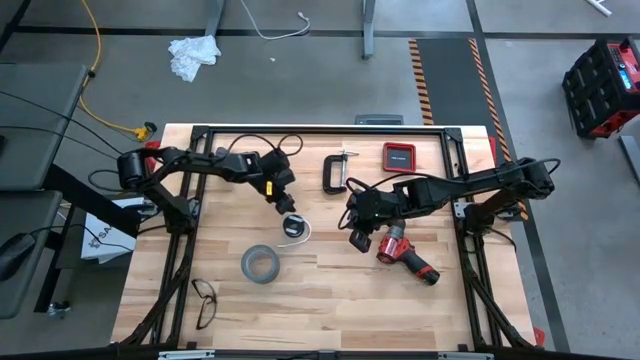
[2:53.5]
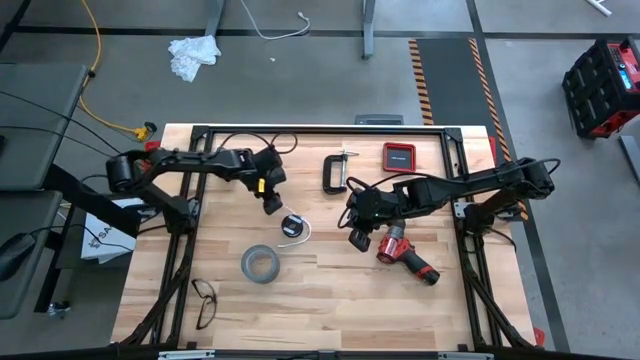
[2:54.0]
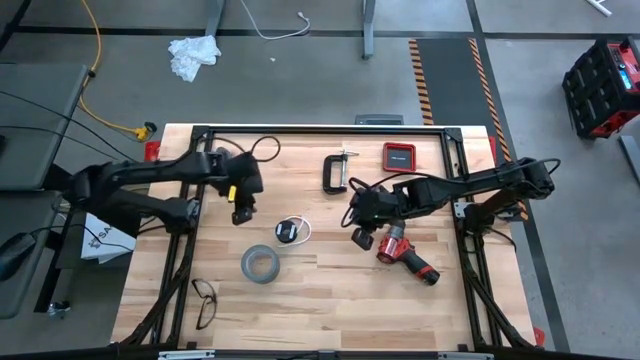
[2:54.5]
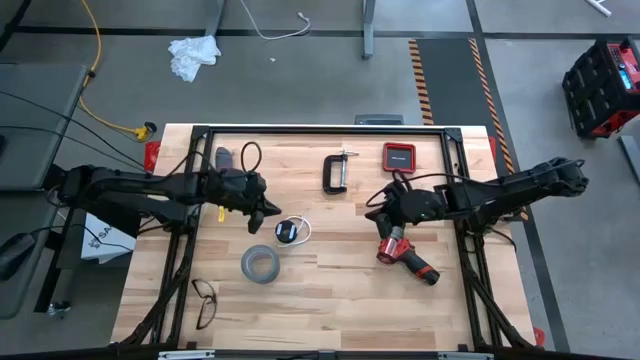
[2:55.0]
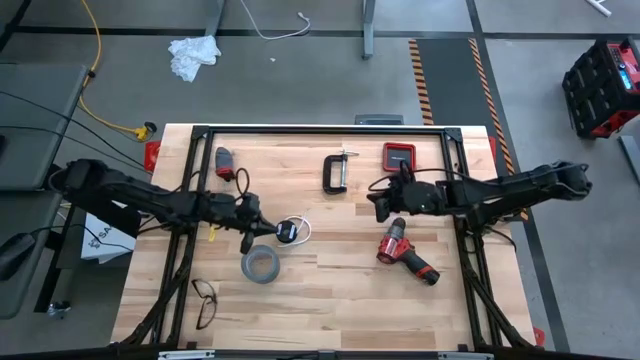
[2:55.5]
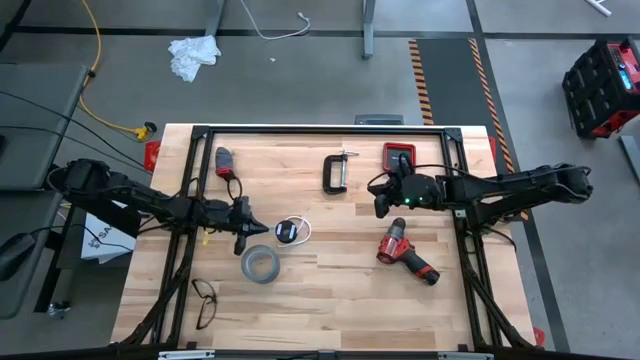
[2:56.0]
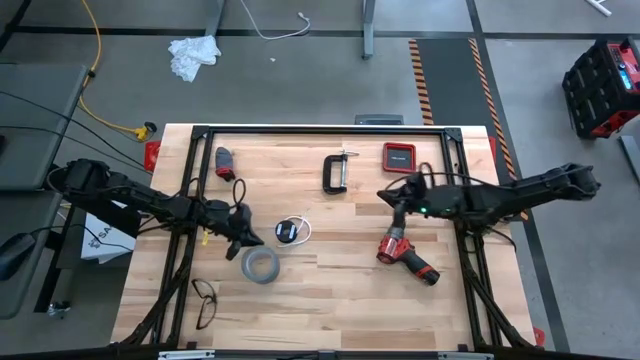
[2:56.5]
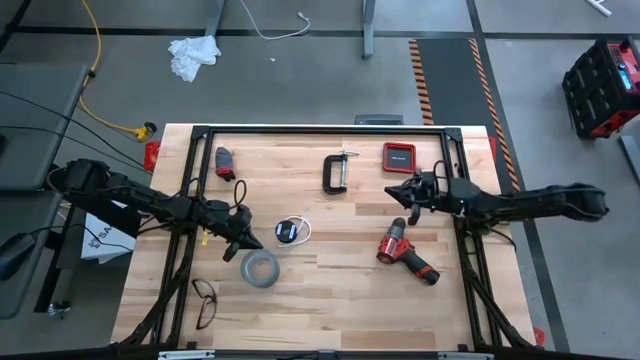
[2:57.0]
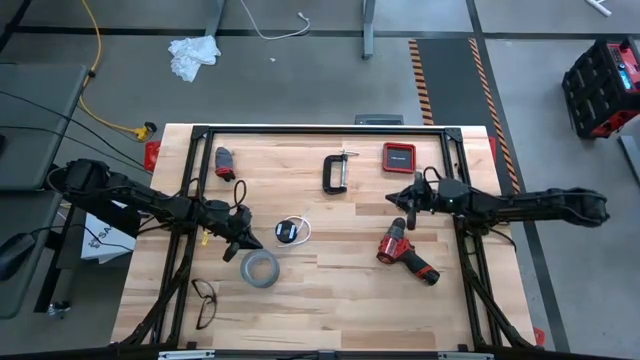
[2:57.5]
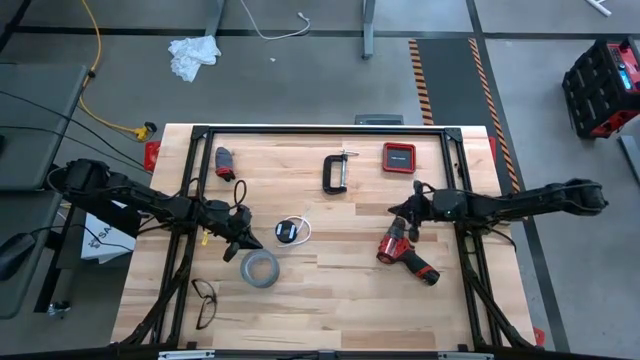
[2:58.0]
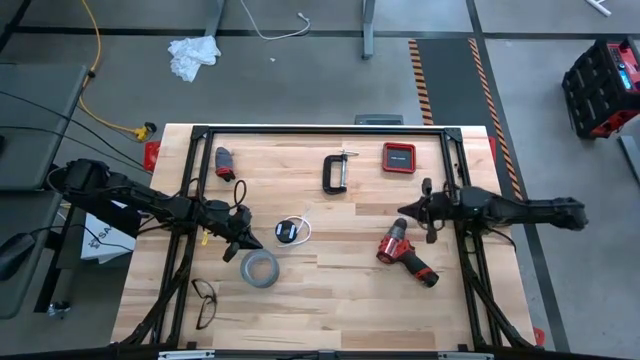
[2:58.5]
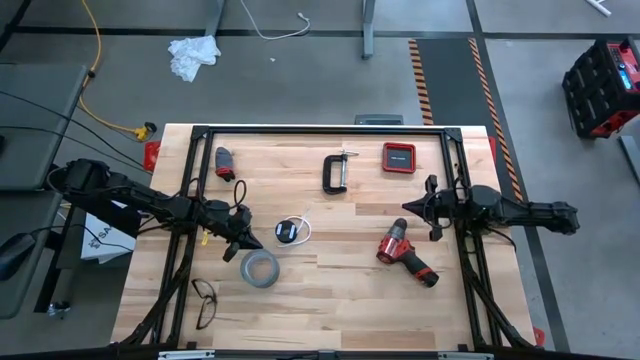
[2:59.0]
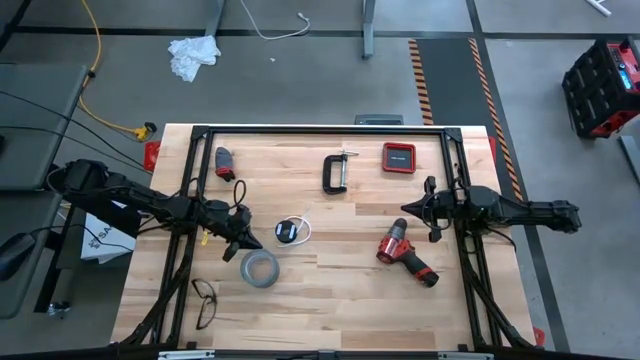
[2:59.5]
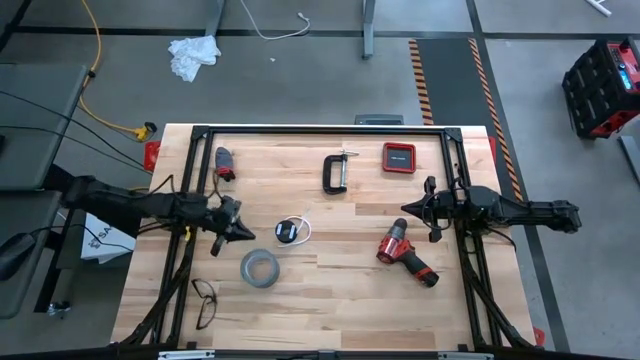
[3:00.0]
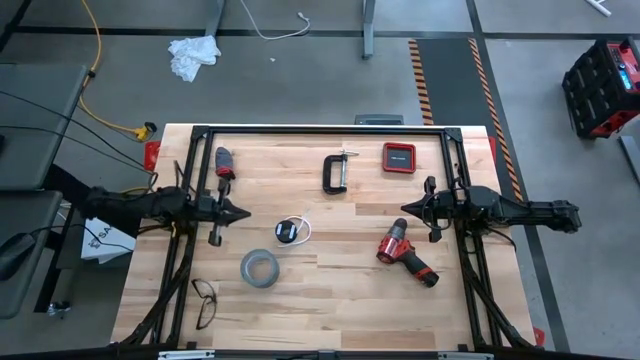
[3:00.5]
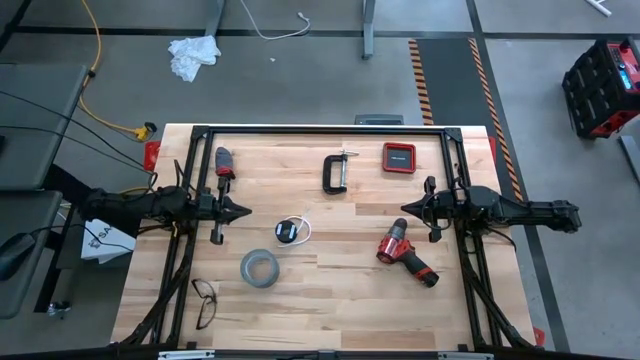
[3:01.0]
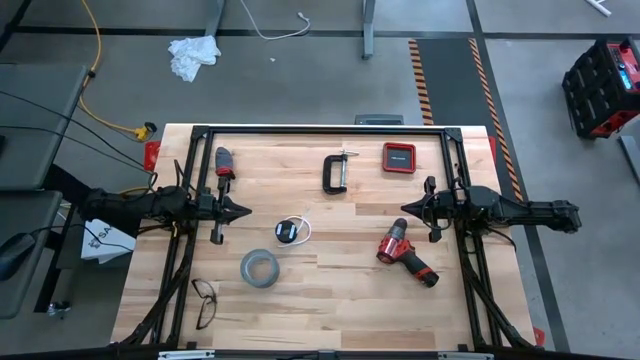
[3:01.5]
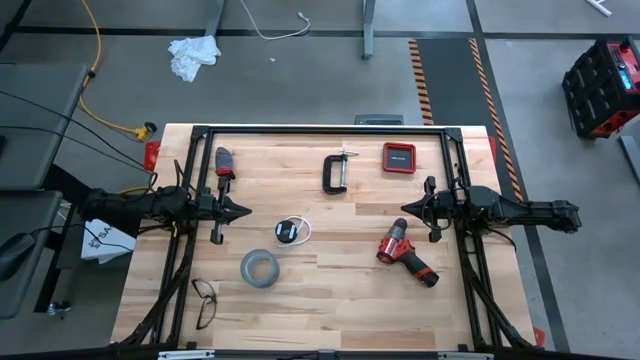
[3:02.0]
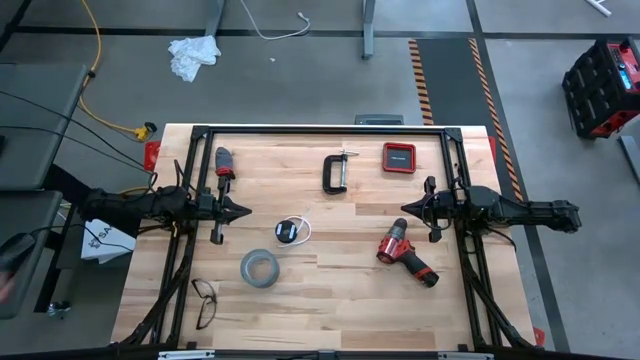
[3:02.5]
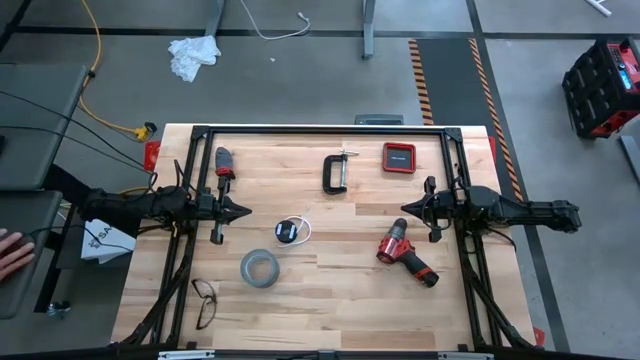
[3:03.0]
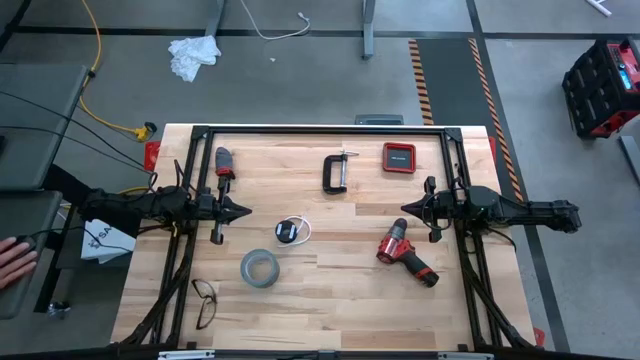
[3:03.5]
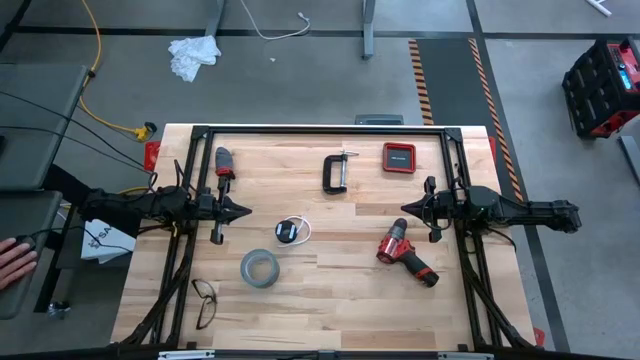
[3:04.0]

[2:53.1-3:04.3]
Task: Coil cords
Return to Home Position

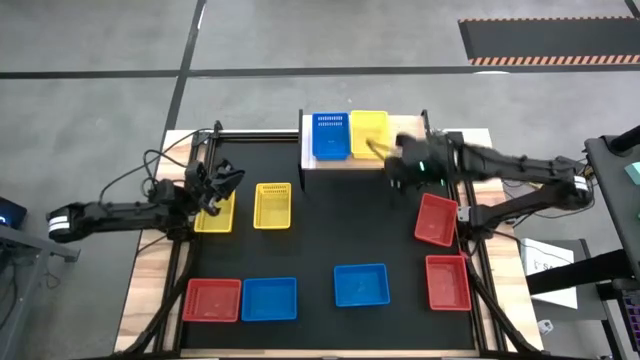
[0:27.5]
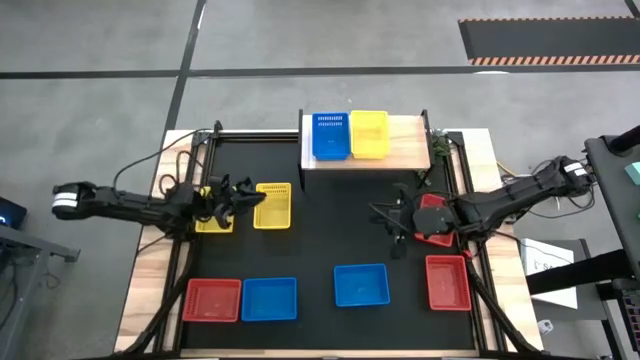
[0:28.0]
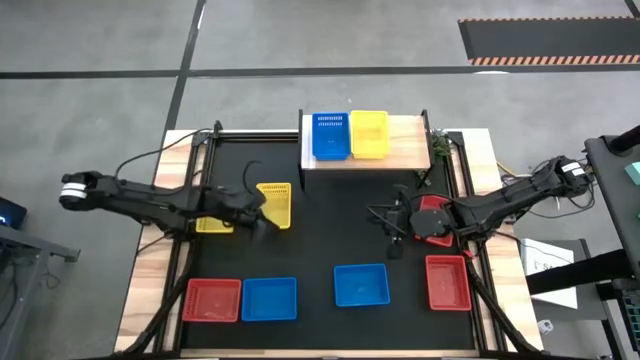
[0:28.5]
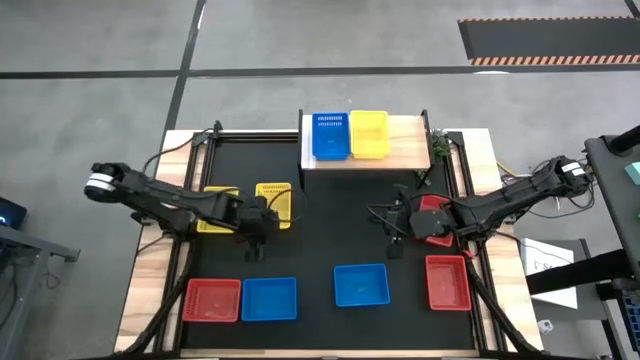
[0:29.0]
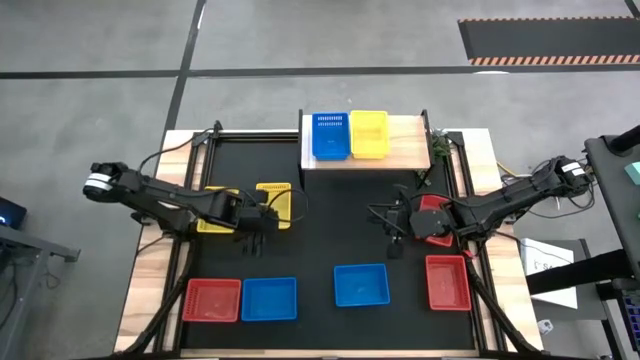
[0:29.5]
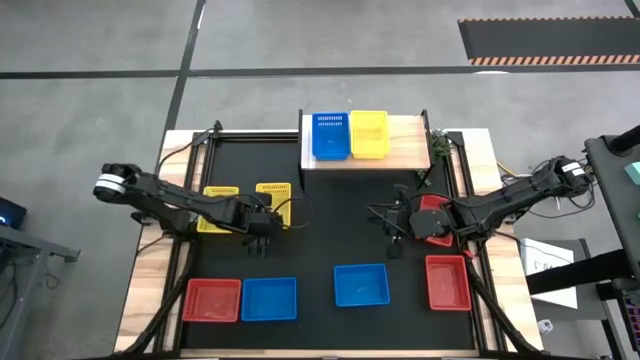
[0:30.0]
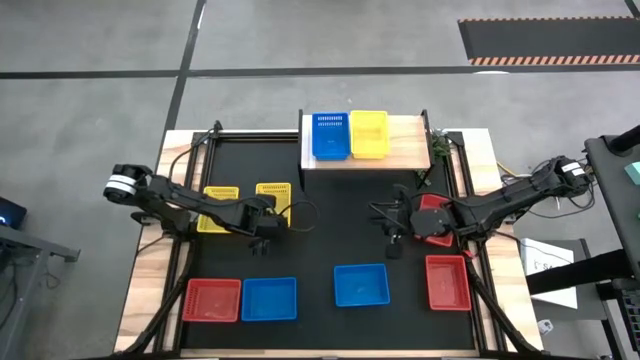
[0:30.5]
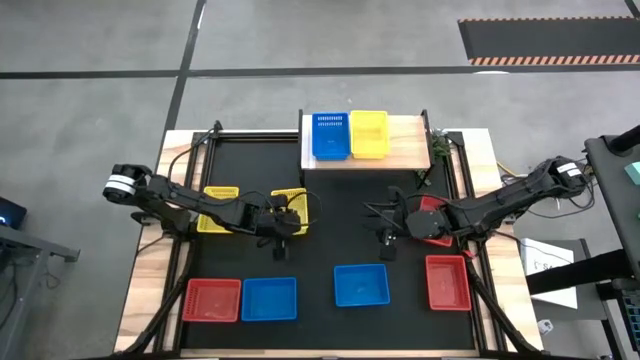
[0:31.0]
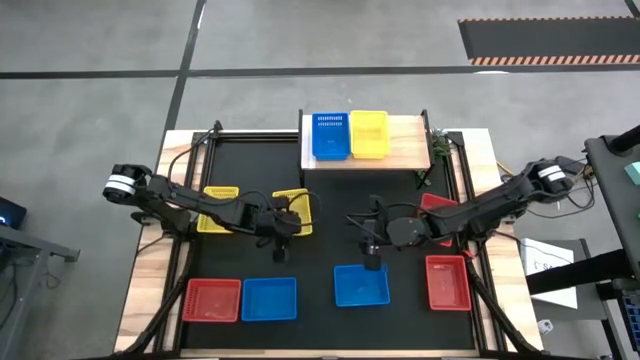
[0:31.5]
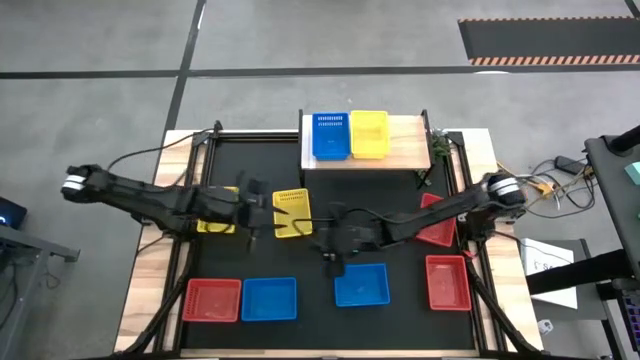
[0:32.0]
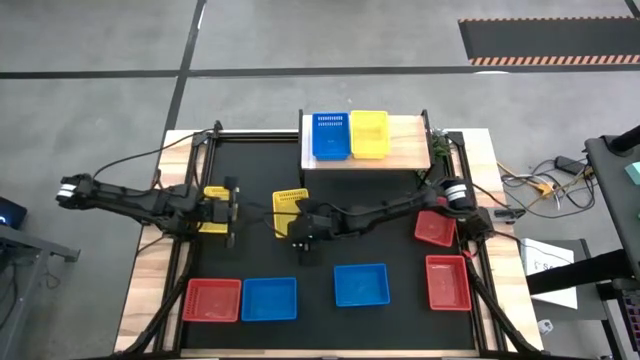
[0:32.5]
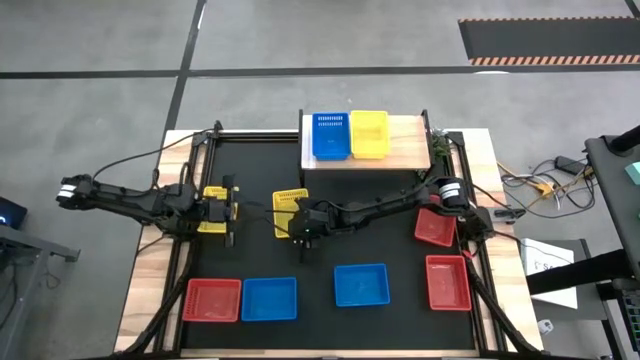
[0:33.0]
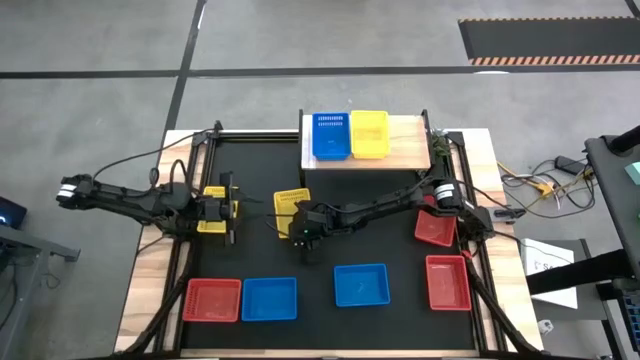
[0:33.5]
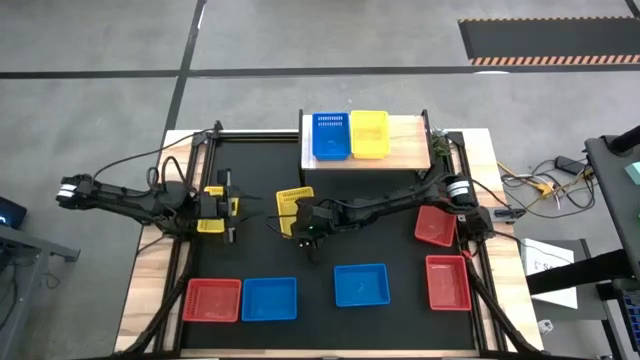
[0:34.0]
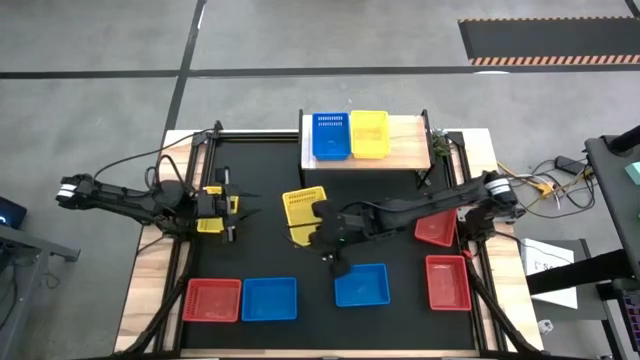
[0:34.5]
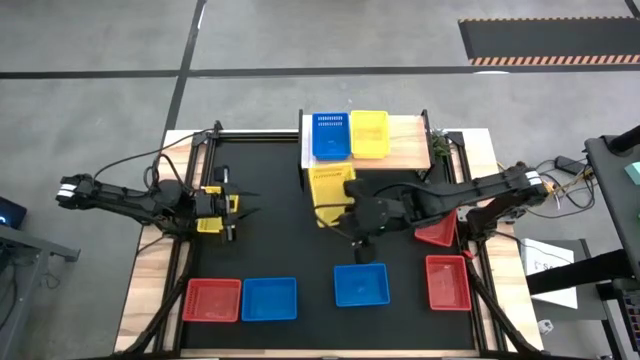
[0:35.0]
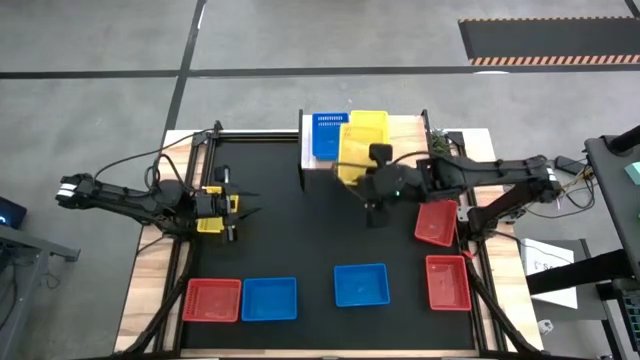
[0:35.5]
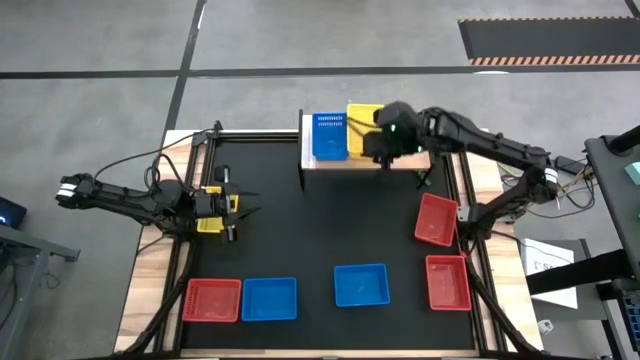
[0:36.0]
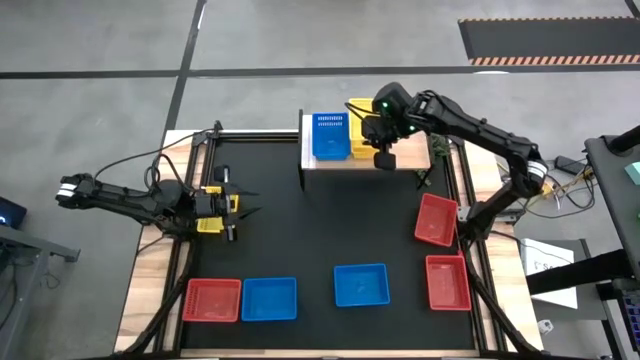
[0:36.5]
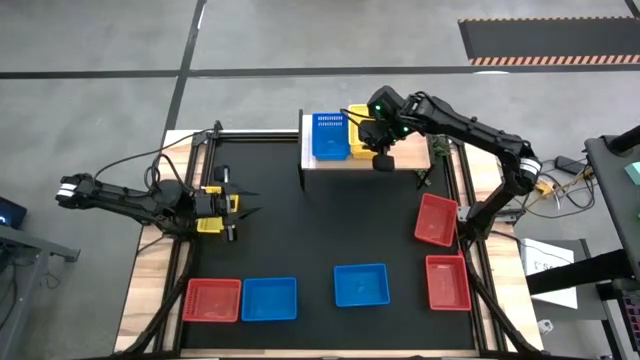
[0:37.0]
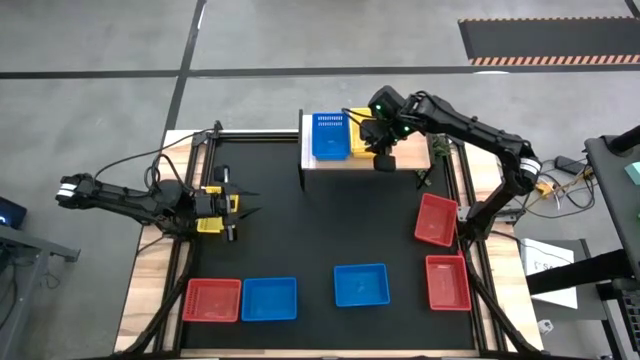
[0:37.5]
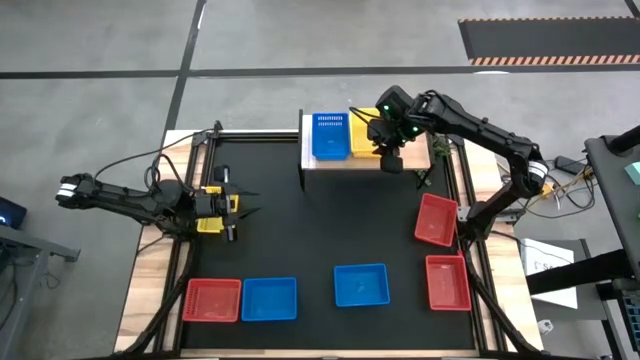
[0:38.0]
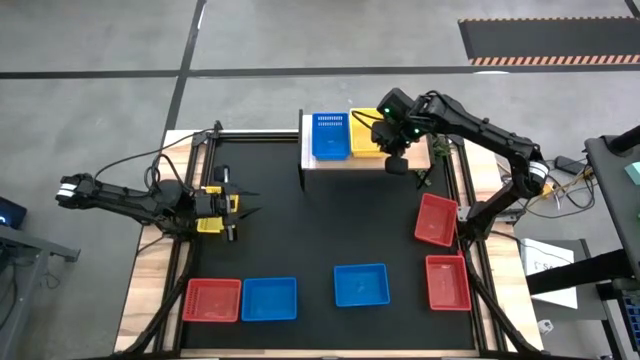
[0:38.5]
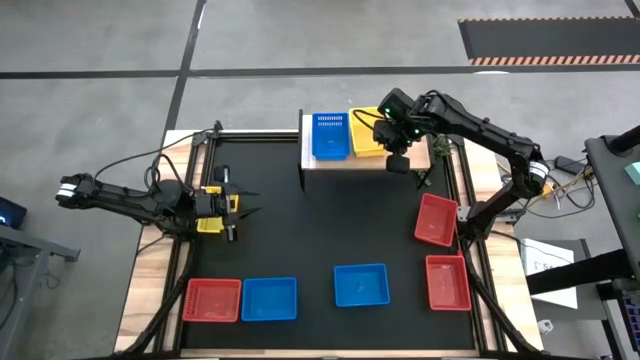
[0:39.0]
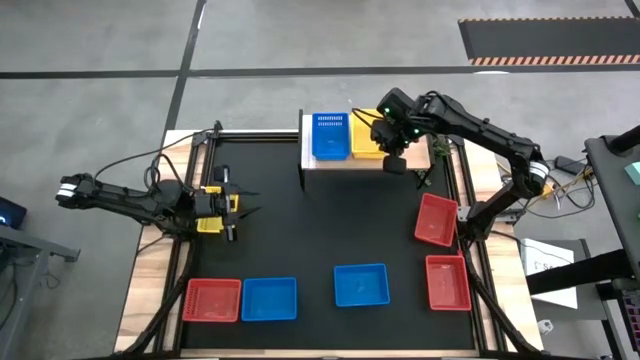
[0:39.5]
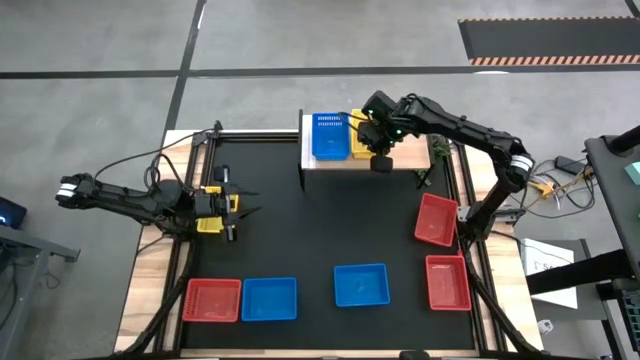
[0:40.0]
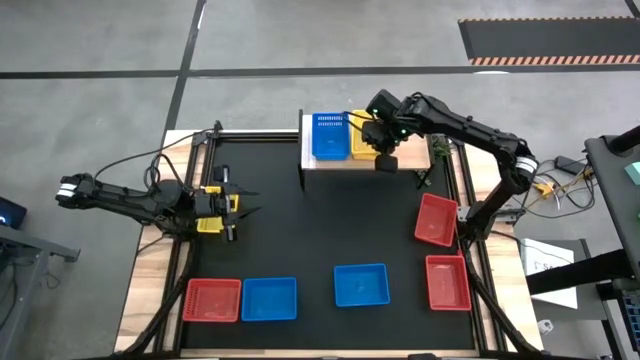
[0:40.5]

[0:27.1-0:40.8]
Task: Stack baskets on shelf by color
Stack the right yellow bin on top of the yellow bin on the shelf
